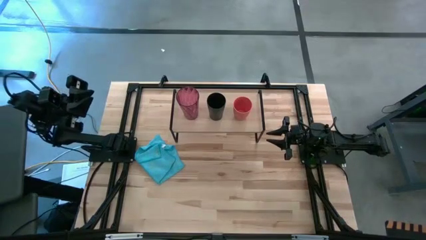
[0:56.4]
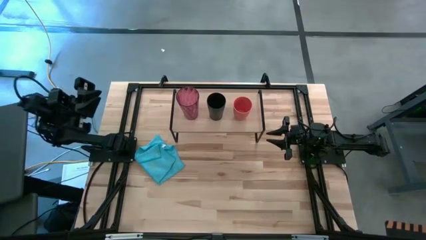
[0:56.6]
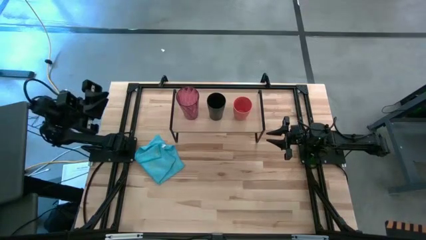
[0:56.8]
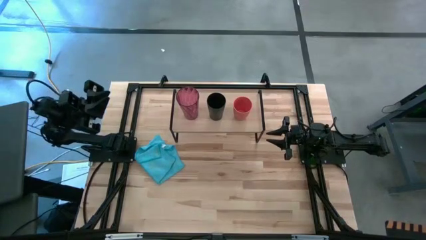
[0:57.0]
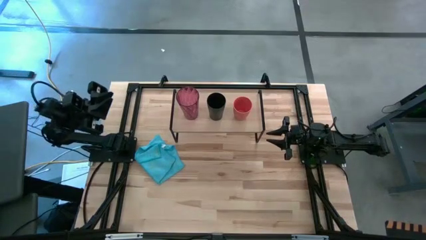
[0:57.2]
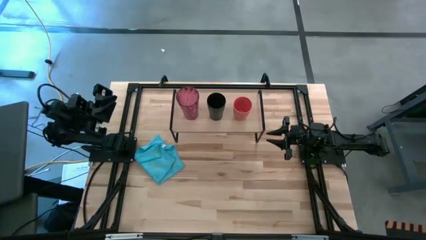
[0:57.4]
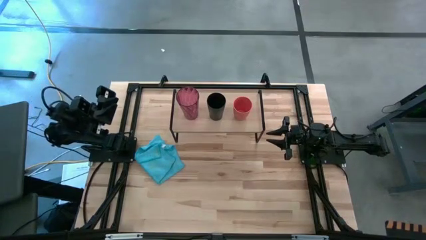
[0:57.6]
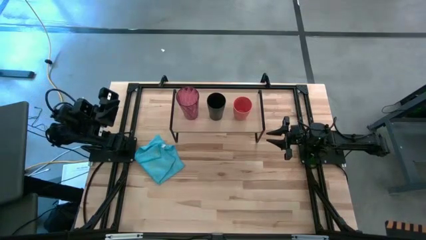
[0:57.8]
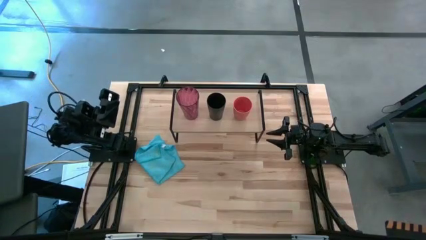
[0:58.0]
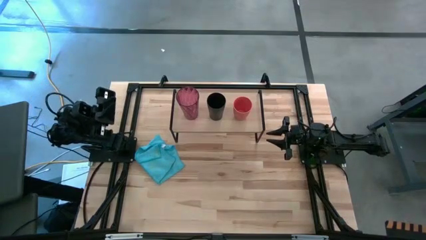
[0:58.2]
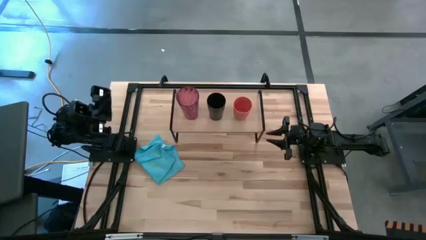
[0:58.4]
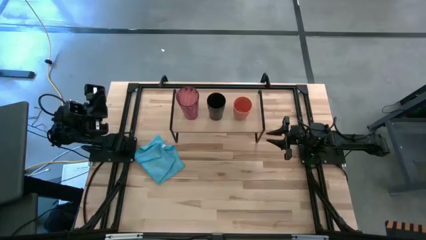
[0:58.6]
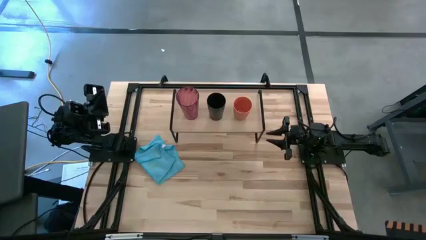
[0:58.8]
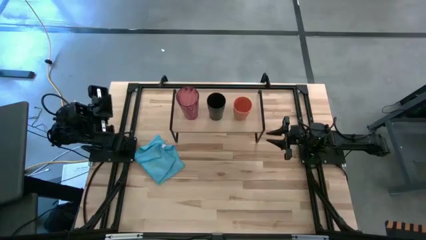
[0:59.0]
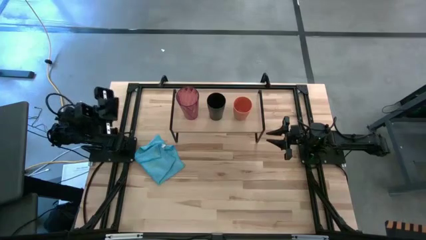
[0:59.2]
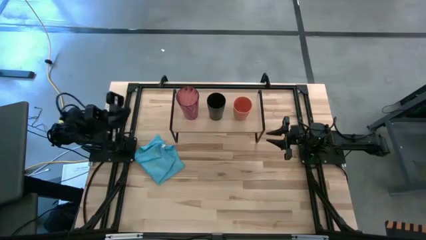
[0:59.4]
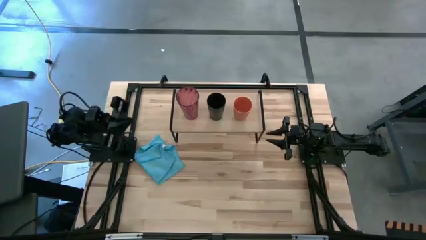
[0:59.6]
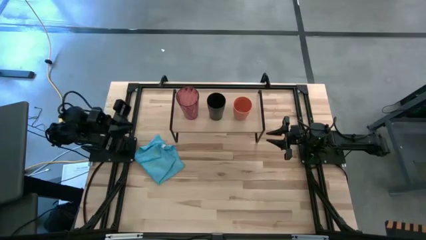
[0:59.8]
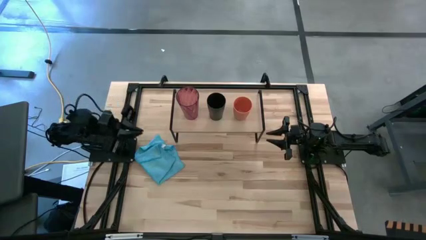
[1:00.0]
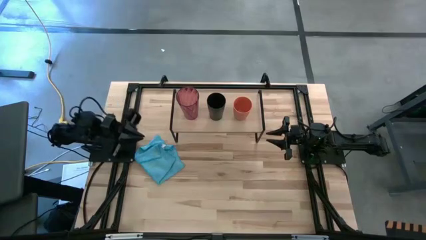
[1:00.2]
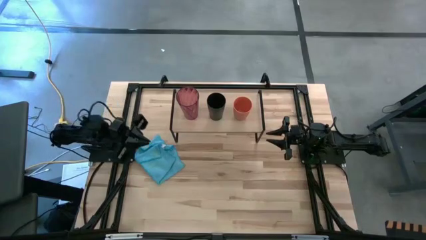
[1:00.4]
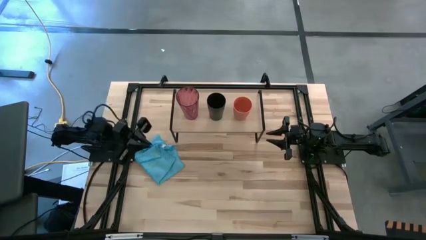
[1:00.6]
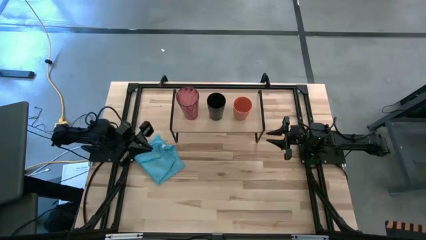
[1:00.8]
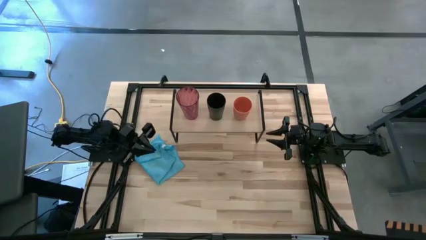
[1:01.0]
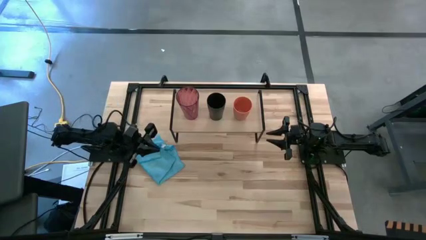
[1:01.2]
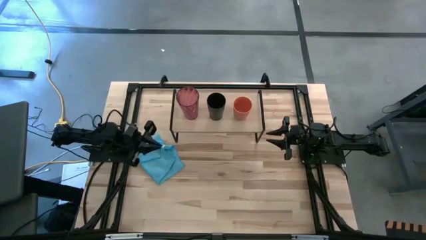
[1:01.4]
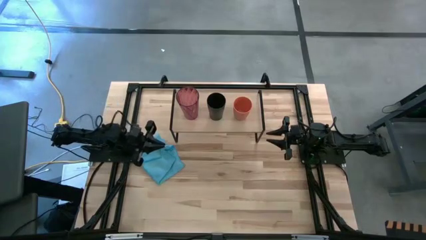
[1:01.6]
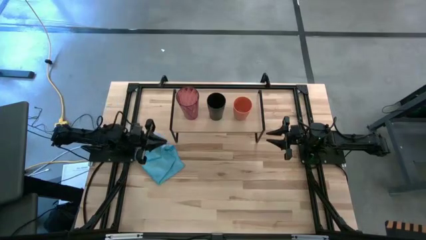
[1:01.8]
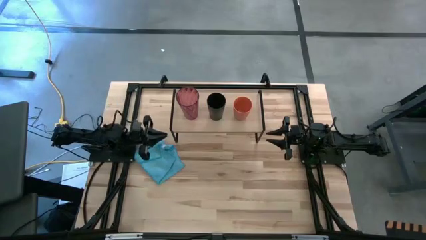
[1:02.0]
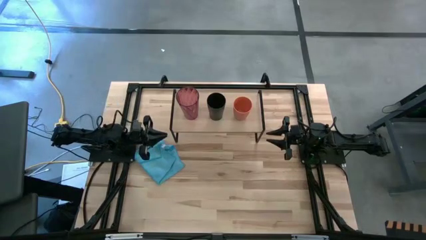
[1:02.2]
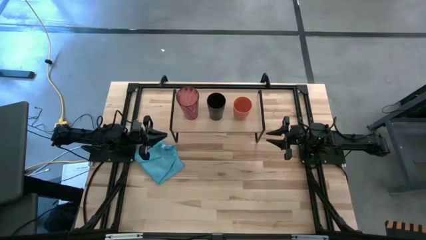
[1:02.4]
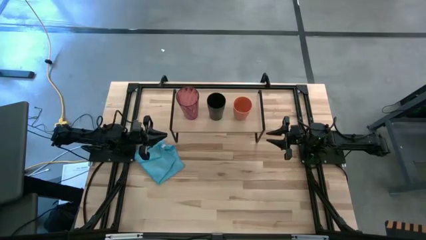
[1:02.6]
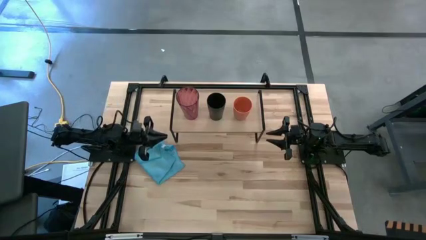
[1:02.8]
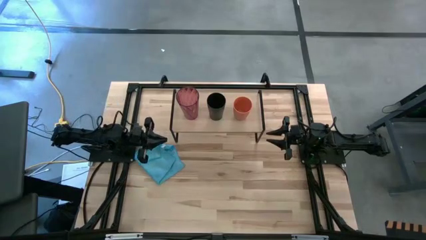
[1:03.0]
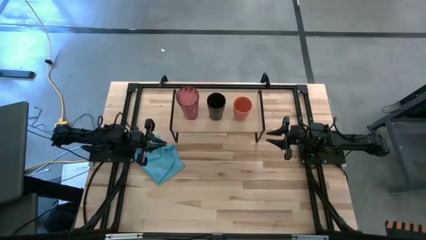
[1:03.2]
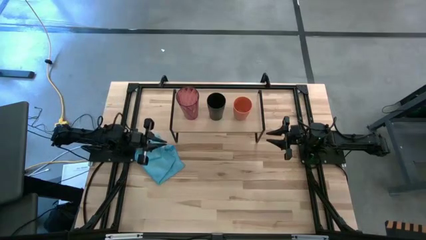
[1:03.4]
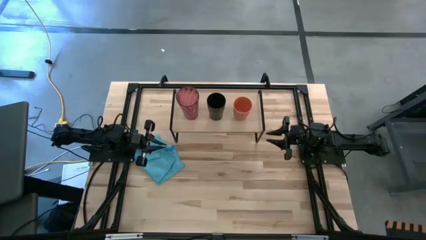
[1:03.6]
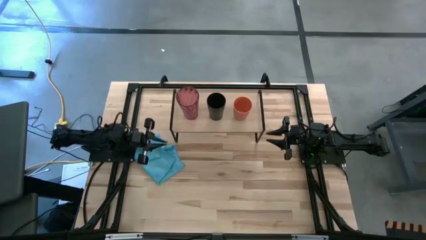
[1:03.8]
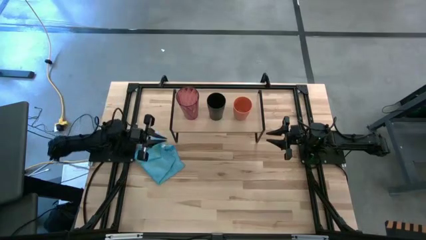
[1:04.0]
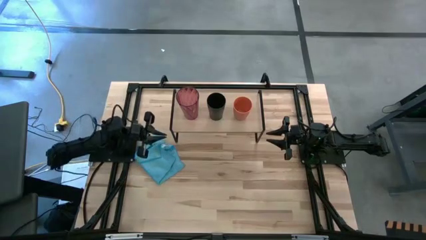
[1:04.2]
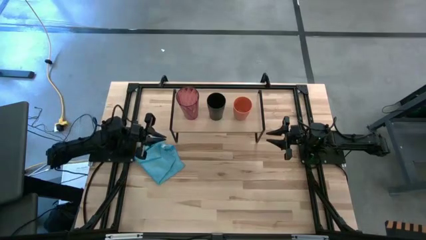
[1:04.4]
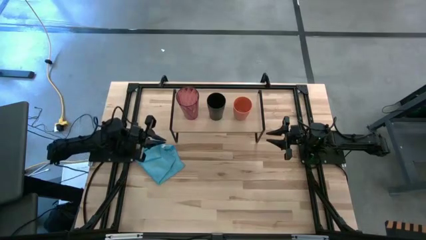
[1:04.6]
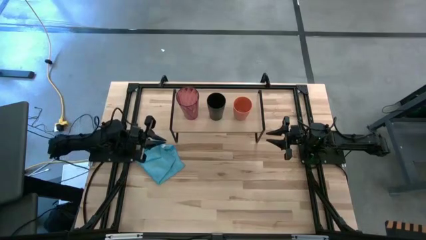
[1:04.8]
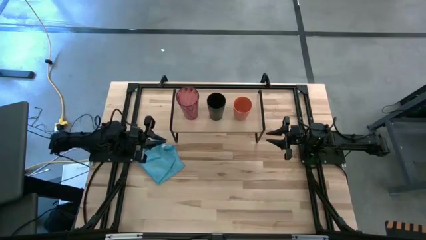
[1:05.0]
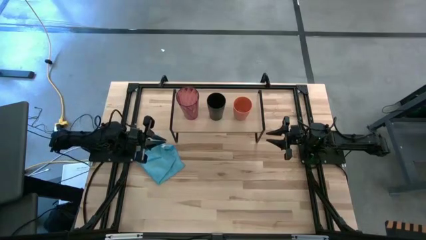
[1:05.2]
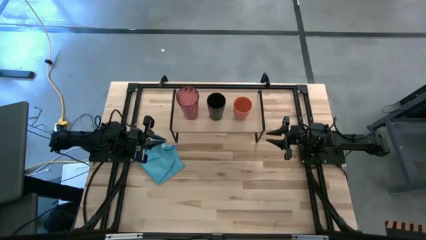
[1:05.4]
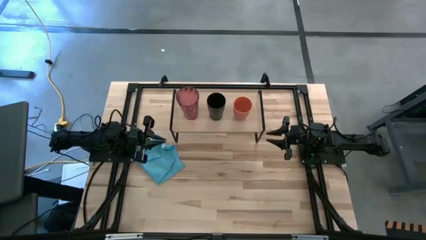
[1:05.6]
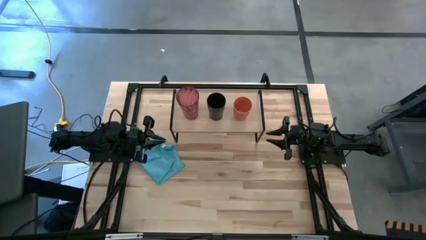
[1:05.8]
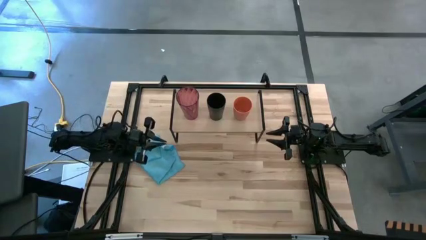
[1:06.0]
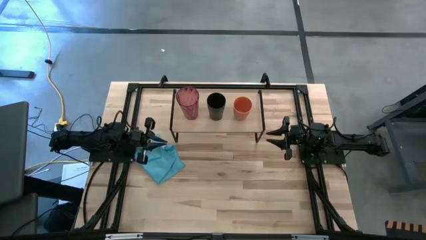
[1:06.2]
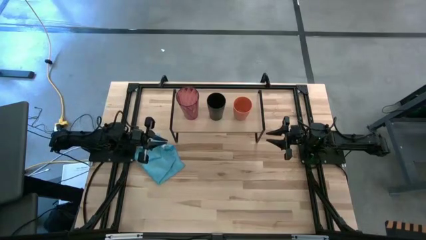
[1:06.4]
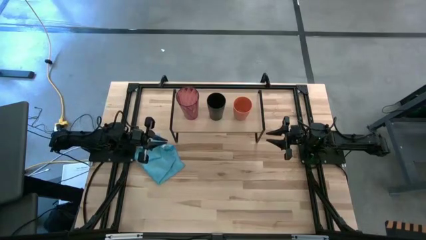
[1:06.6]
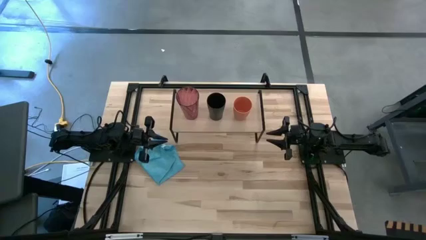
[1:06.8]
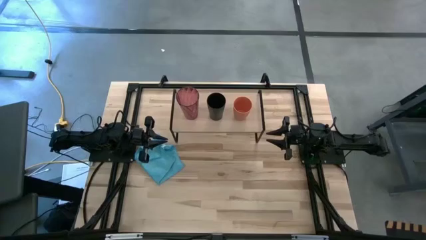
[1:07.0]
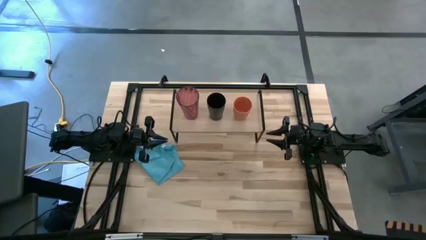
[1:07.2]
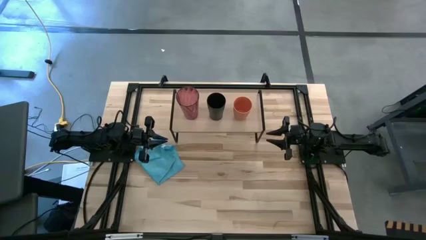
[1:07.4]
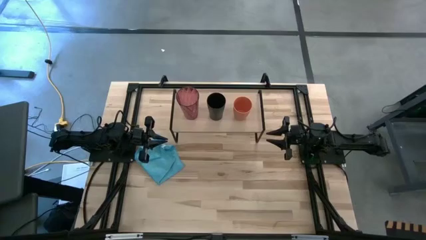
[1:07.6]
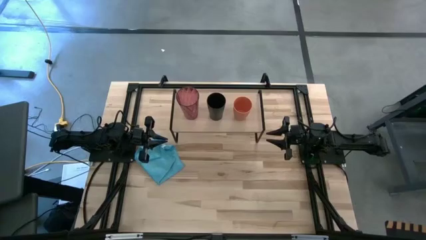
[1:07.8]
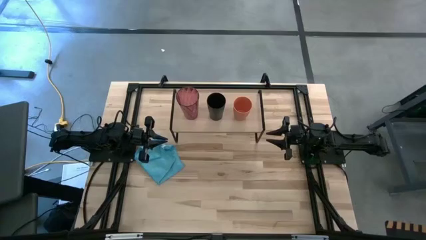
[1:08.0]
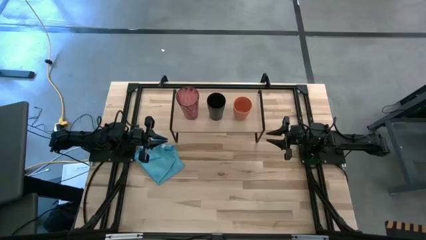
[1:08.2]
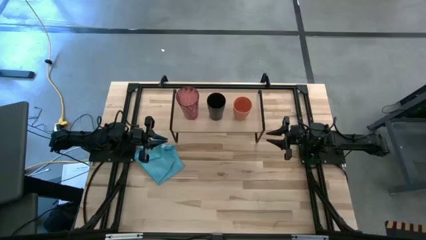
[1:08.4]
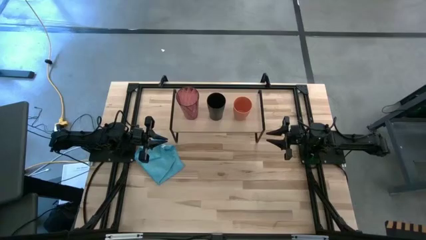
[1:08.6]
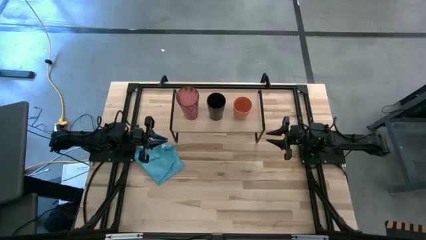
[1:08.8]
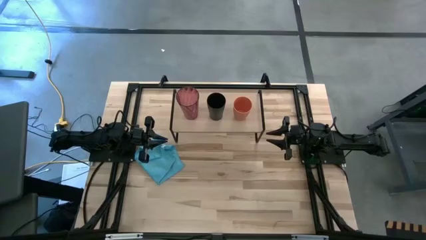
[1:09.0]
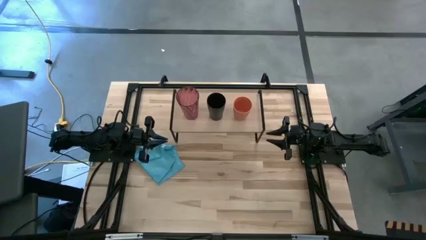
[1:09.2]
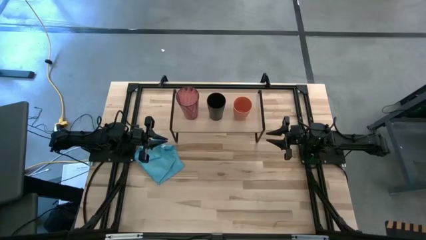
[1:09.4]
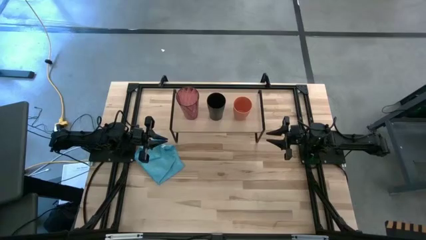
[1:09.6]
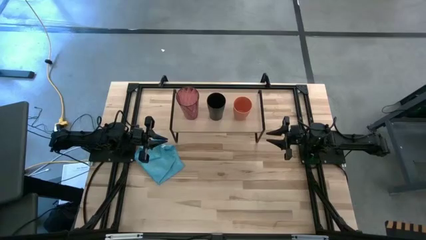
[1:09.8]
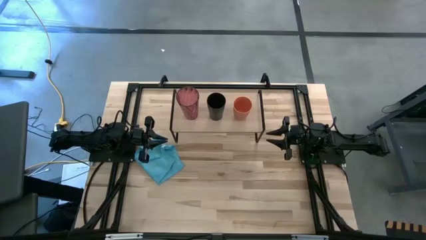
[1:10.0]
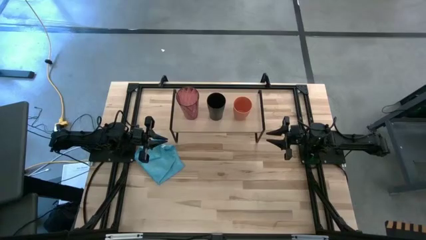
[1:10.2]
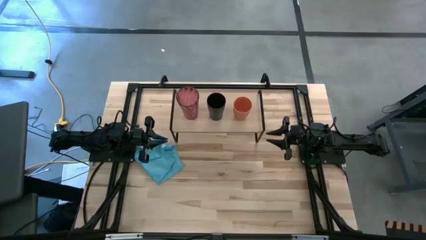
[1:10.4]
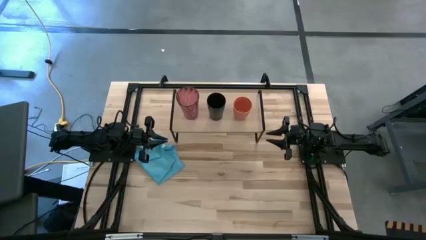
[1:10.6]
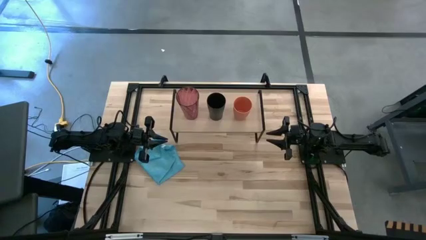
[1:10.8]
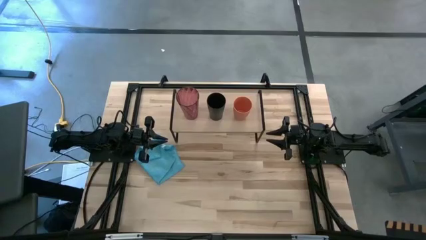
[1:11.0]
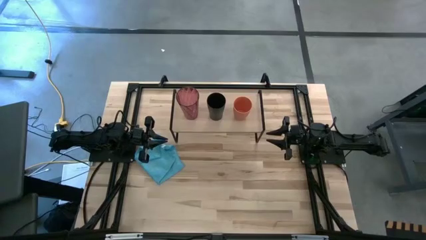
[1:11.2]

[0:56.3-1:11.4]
Task: Stack small to large cups/mugs on shelf
Return to Home Position
